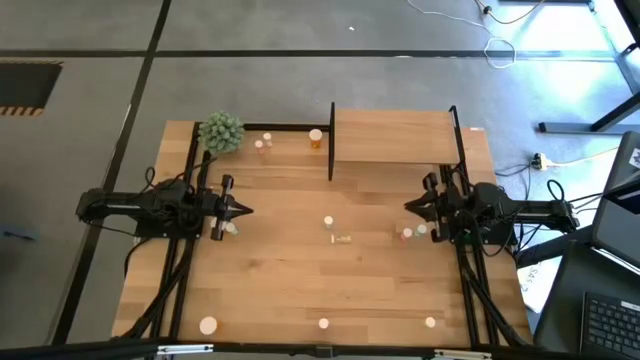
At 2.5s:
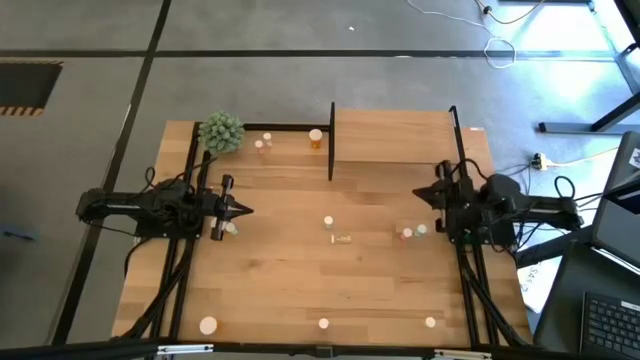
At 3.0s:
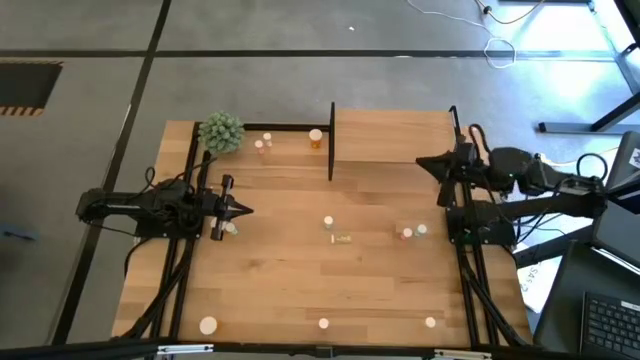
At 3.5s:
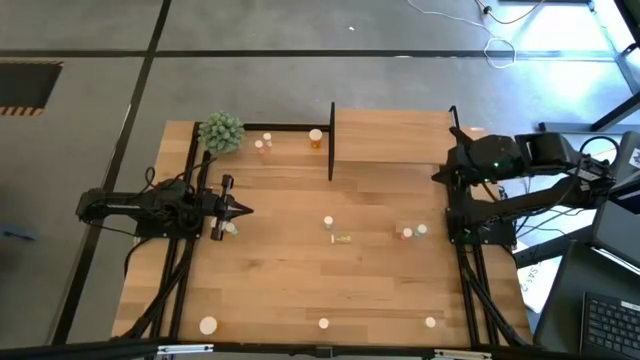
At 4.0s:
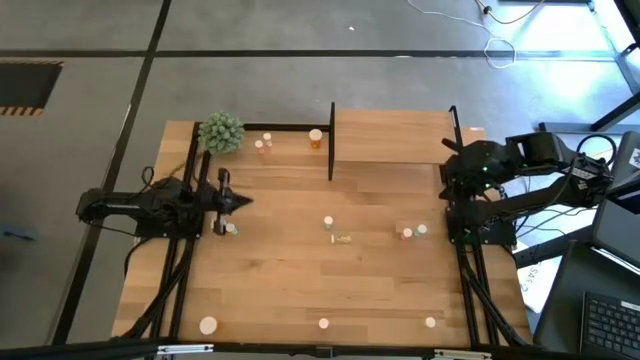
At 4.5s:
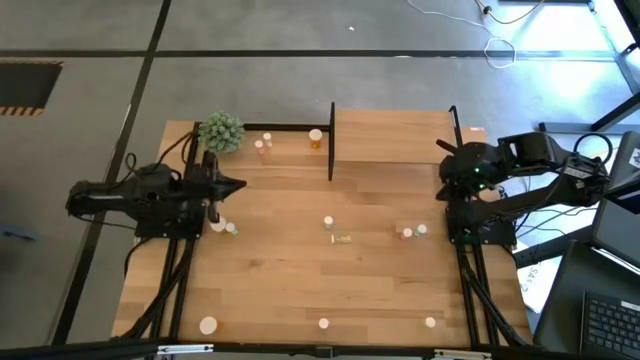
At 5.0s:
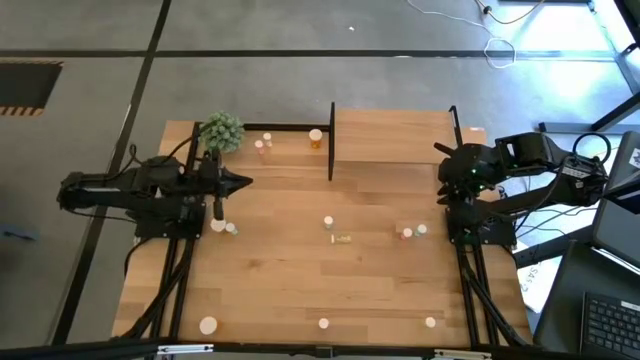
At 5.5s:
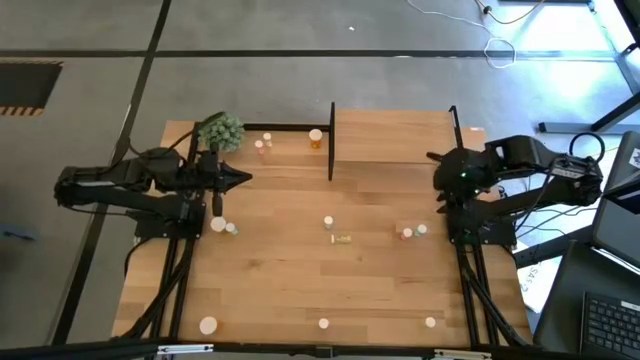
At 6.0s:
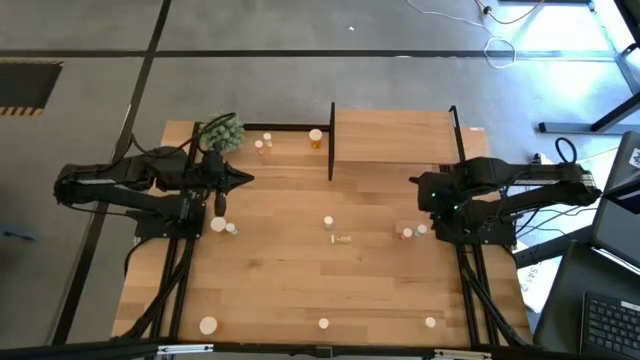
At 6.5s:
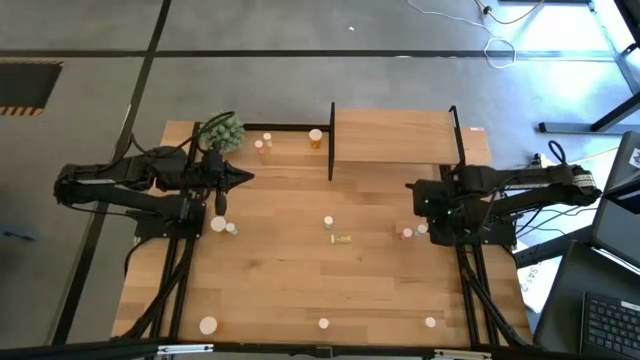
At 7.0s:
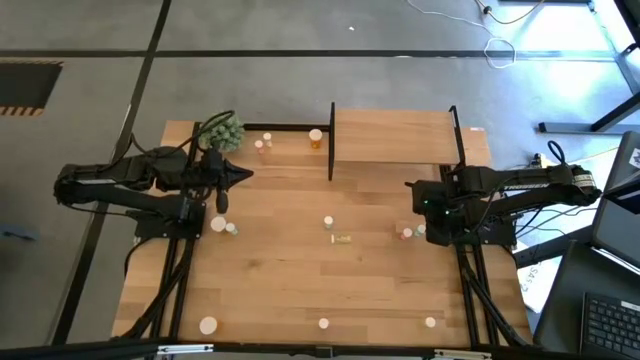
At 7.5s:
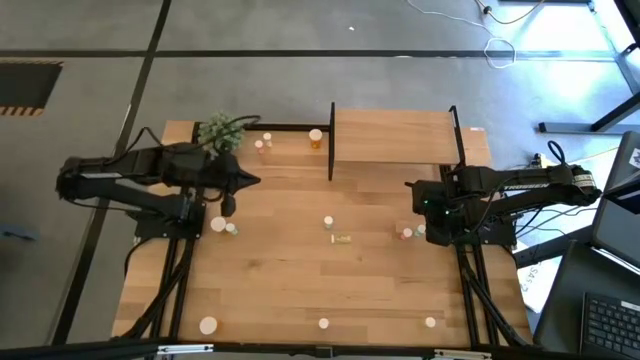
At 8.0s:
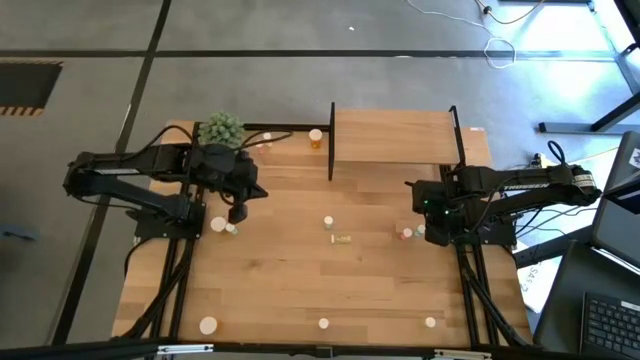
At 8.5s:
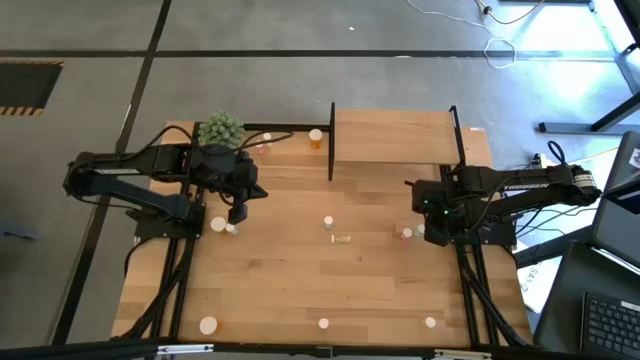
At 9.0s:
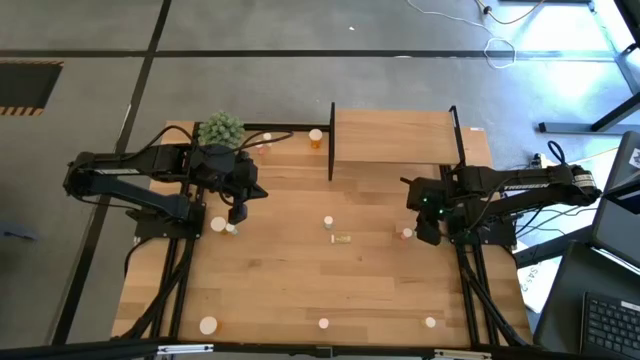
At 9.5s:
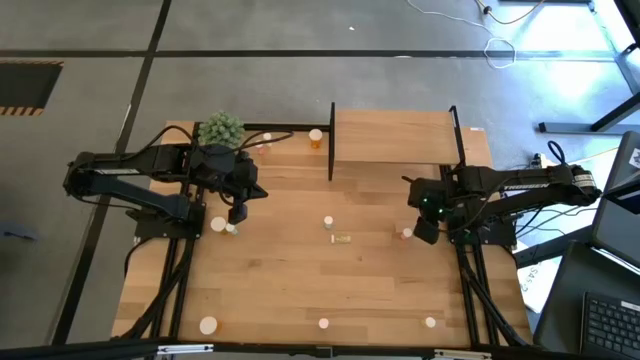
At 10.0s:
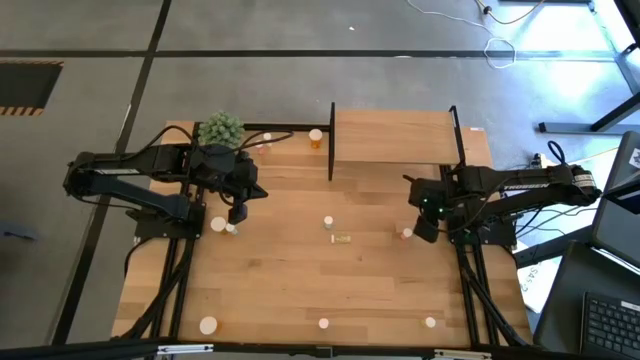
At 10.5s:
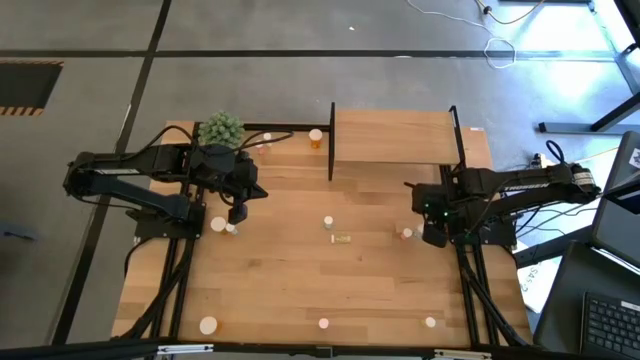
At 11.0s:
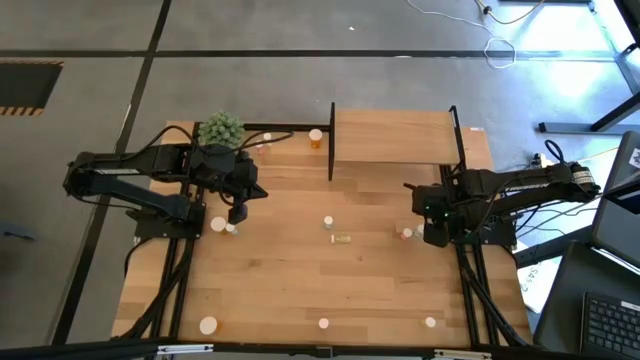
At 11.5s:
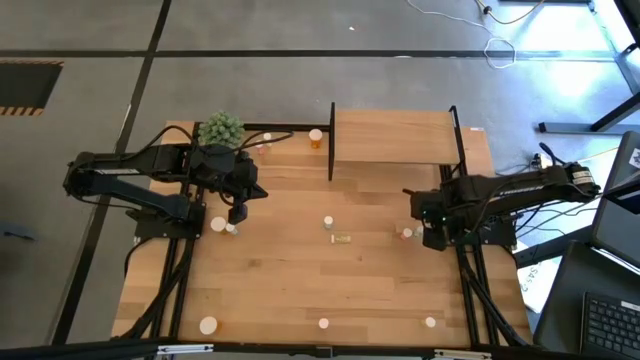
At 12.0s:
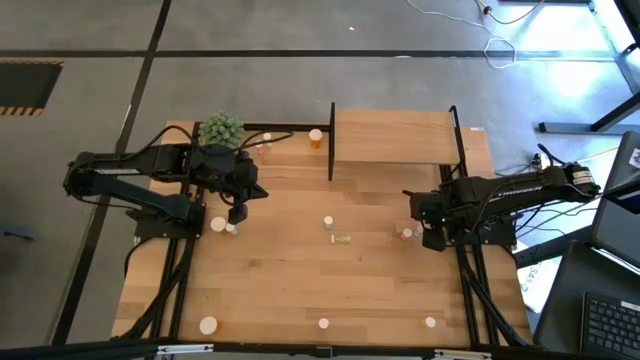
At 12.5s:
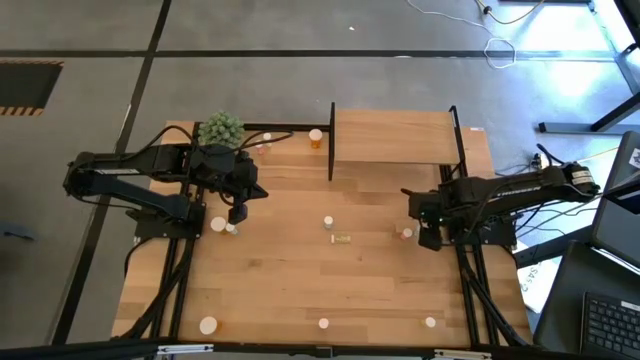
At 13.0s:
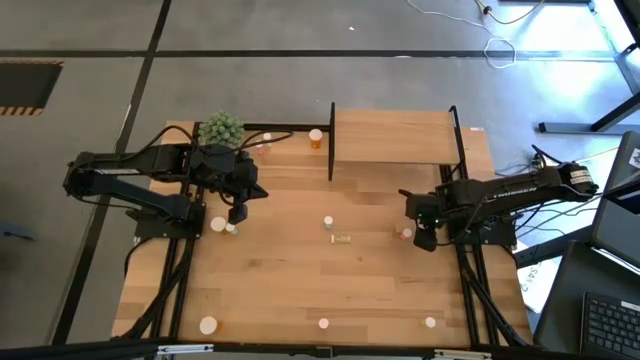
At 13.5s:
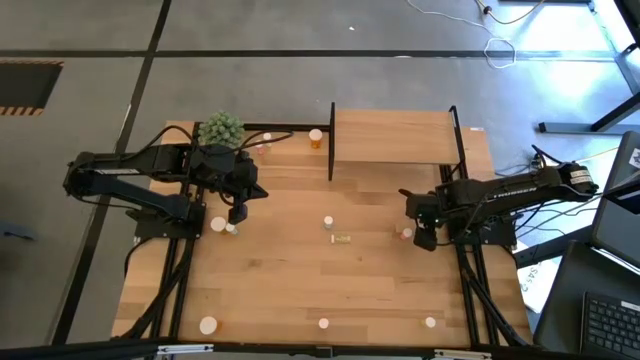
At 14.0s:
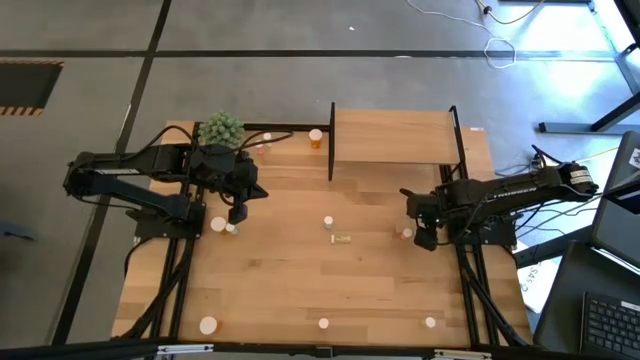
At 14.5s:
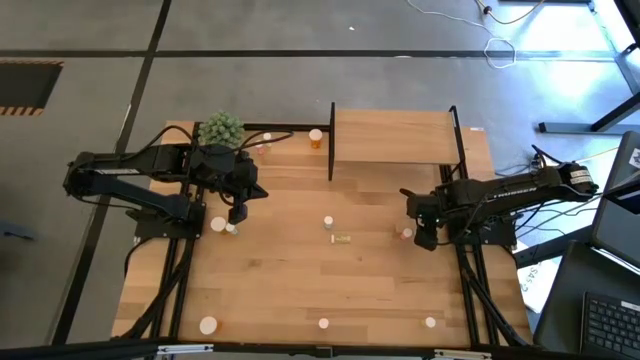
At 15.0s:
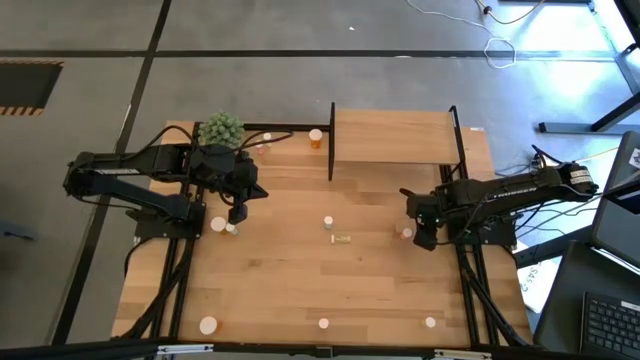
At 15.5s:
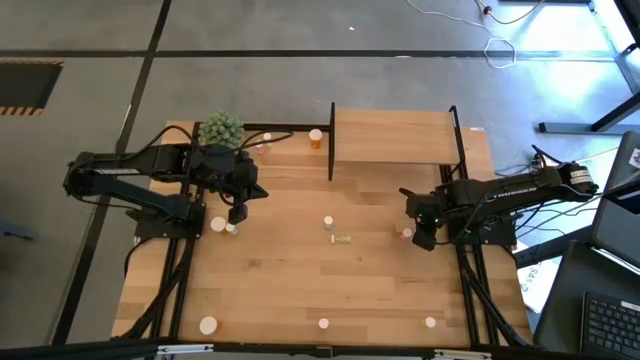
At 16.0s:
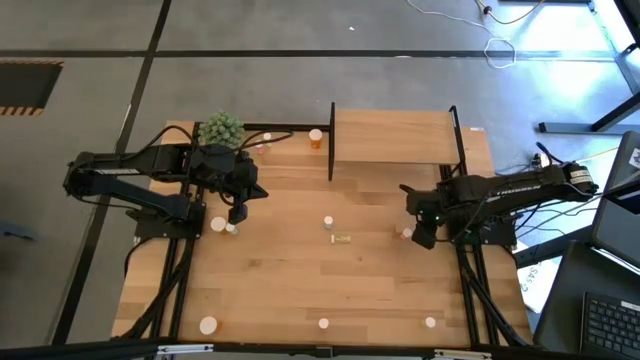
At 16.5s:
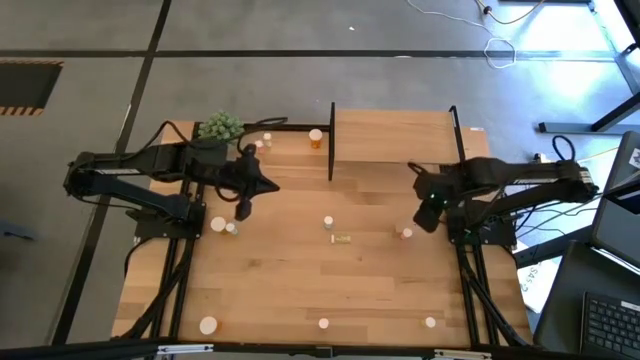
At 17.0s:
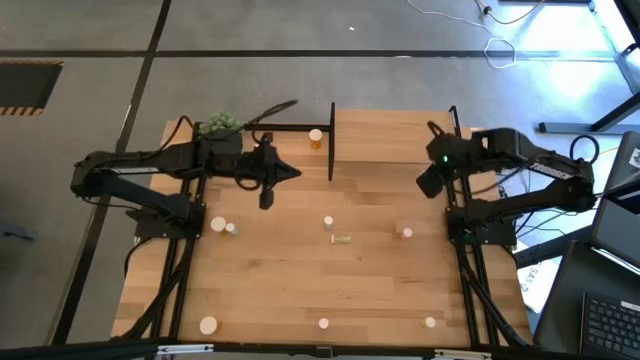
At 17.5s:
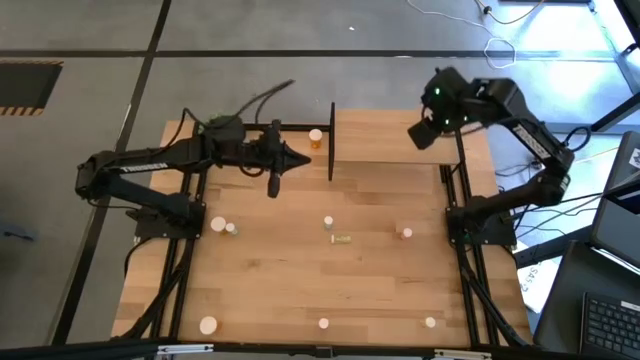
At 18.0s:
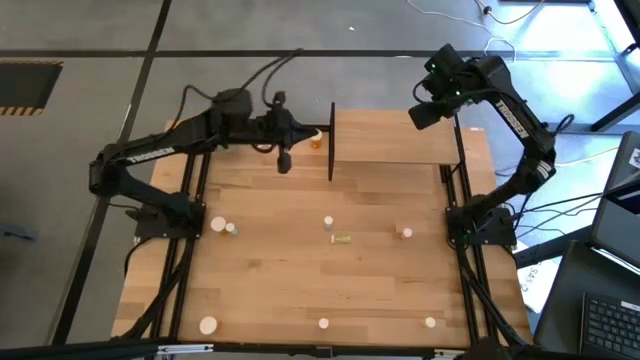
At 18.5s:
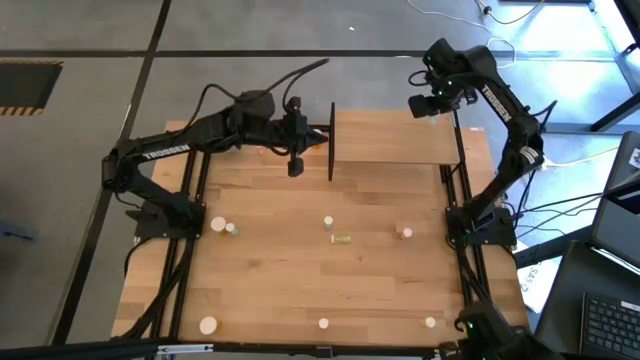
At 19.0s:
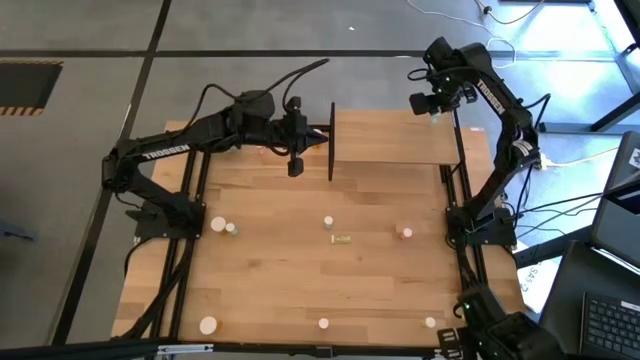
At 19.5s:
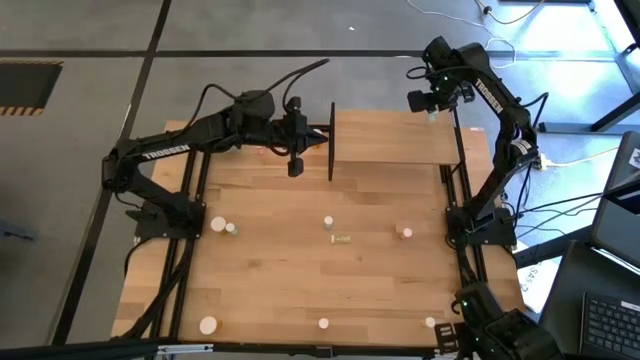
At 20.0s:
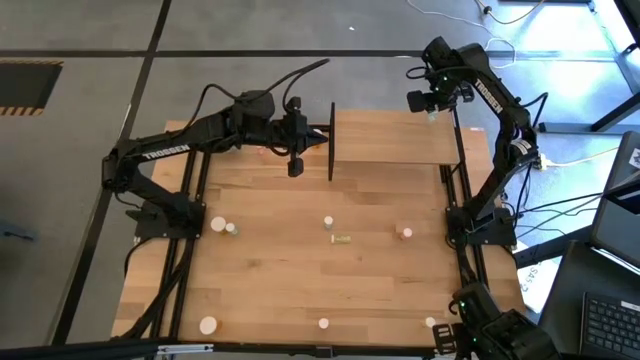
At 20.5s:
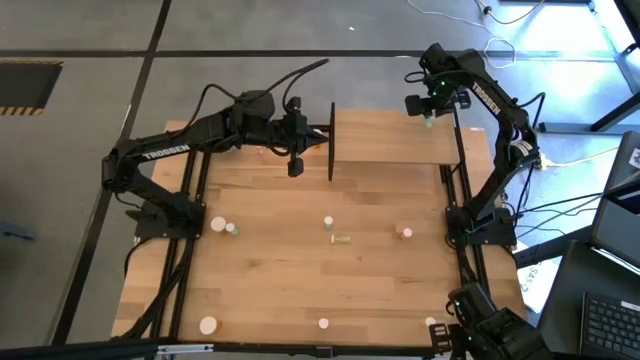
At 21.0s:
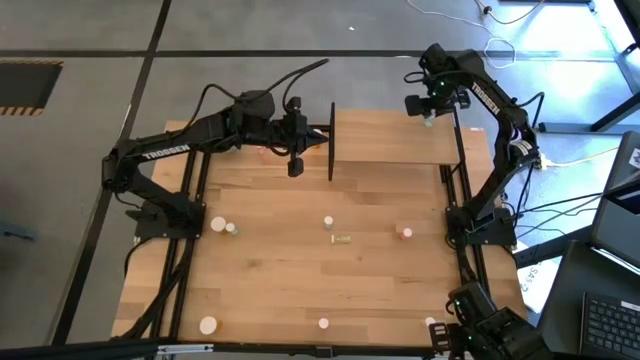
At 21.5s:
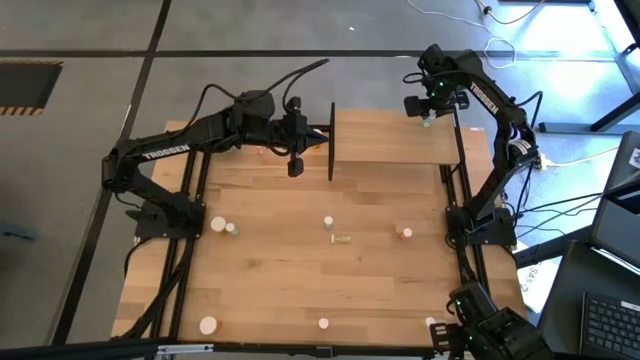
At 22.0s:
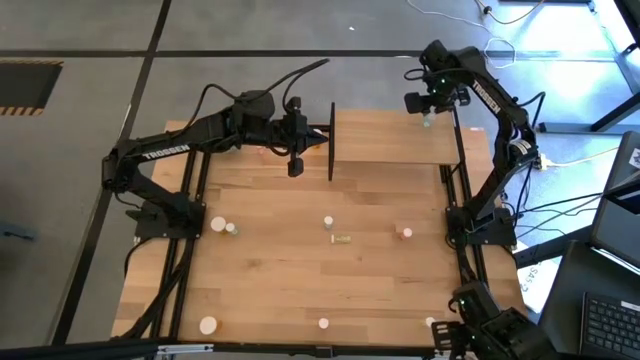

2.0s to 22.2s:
Task: Pick and place medicine bottles onto shelf by color
Put the right blue pill bottle on the shelf
